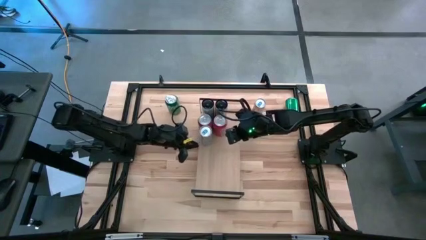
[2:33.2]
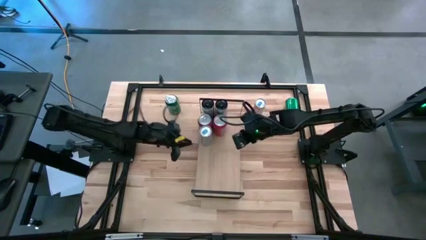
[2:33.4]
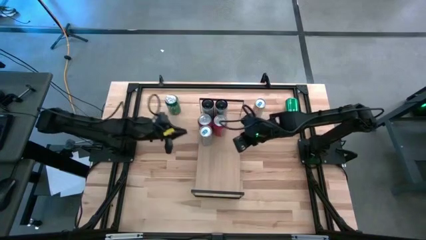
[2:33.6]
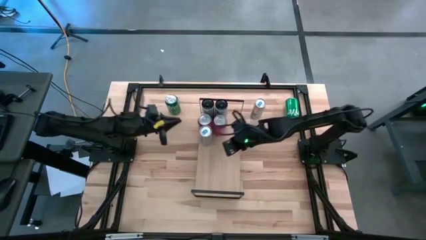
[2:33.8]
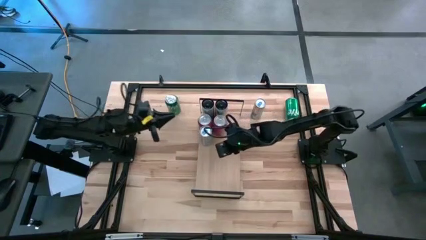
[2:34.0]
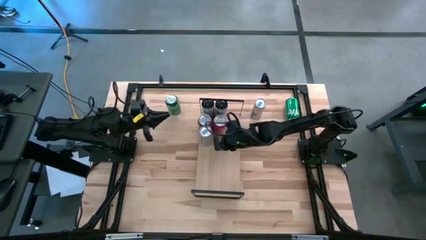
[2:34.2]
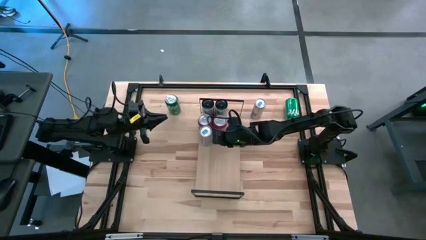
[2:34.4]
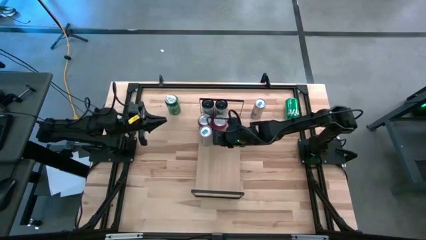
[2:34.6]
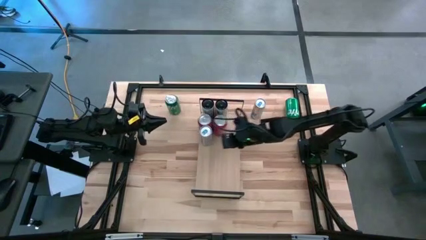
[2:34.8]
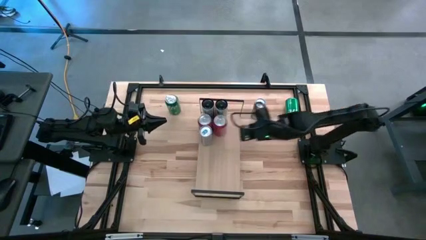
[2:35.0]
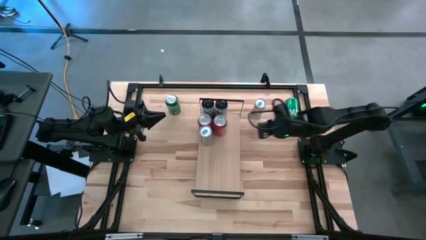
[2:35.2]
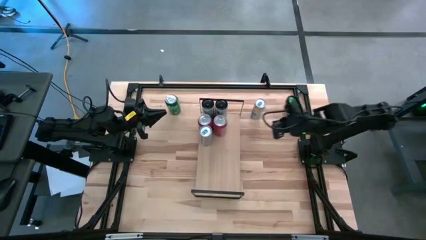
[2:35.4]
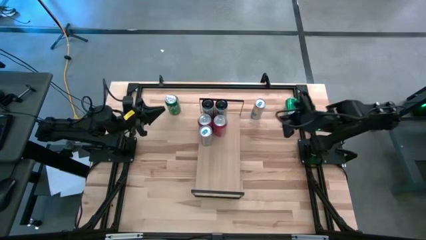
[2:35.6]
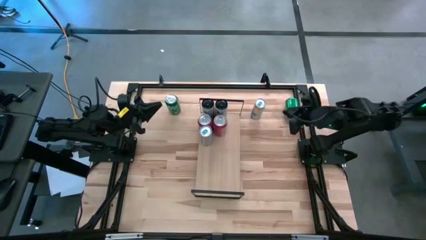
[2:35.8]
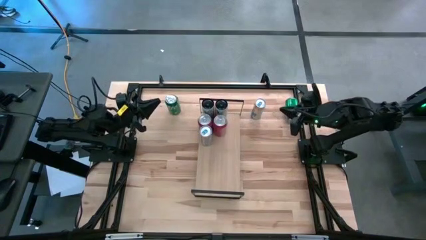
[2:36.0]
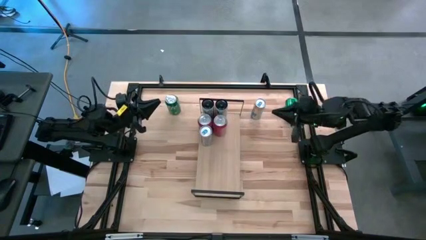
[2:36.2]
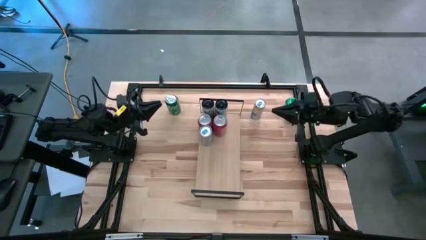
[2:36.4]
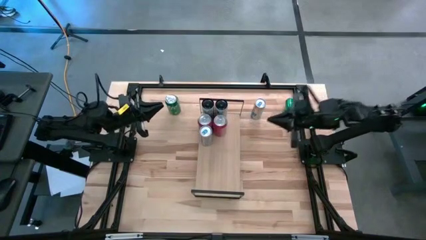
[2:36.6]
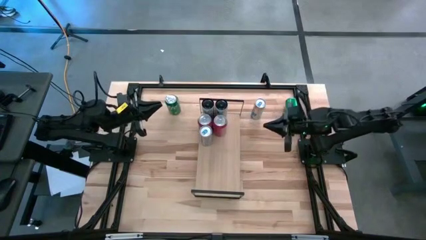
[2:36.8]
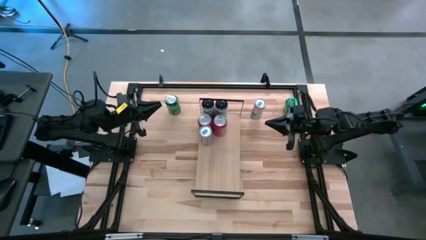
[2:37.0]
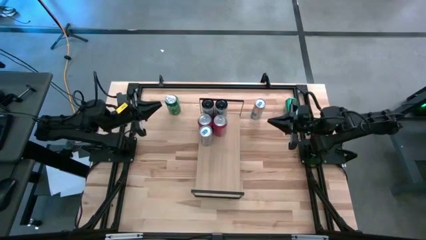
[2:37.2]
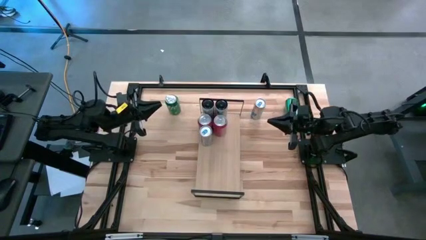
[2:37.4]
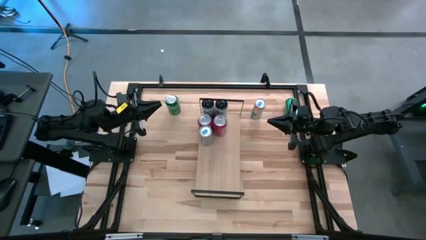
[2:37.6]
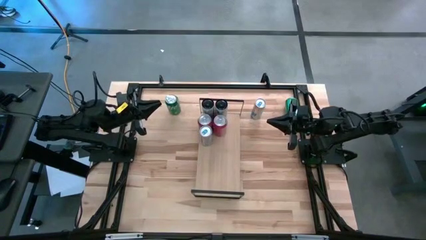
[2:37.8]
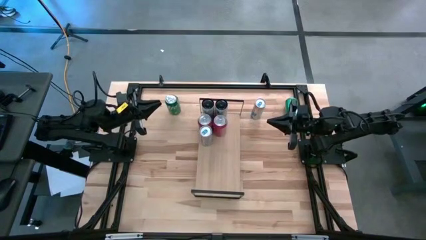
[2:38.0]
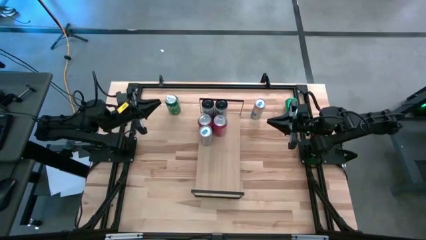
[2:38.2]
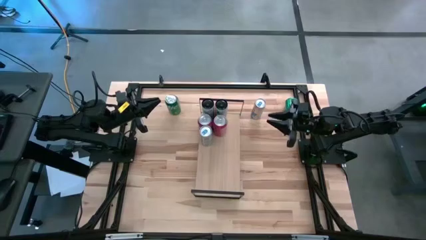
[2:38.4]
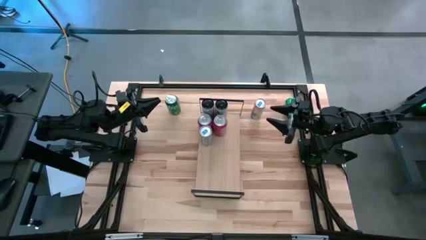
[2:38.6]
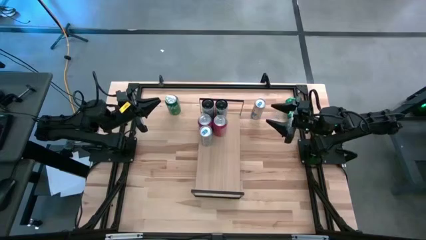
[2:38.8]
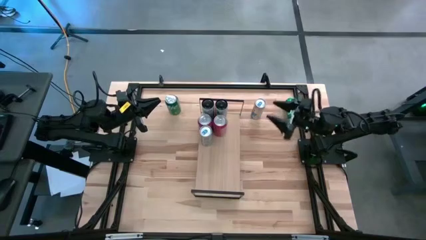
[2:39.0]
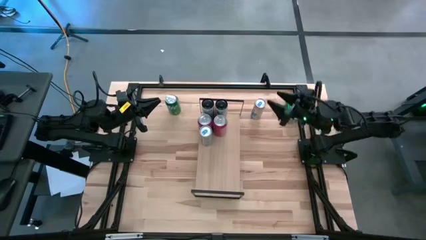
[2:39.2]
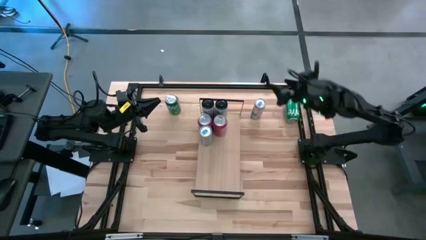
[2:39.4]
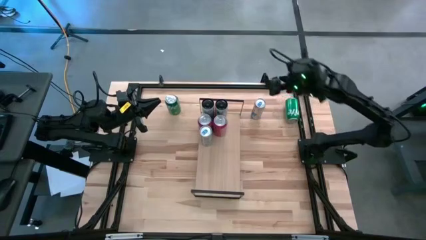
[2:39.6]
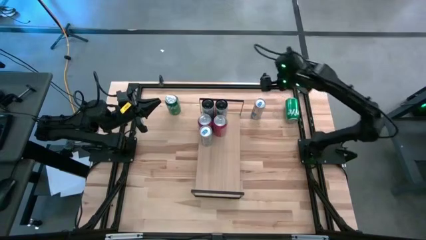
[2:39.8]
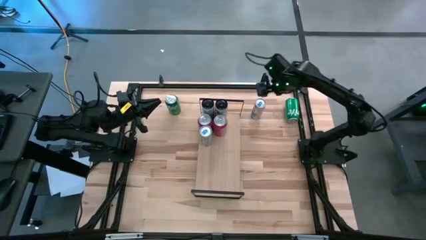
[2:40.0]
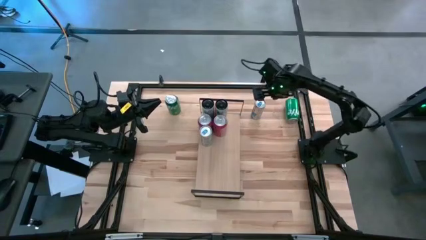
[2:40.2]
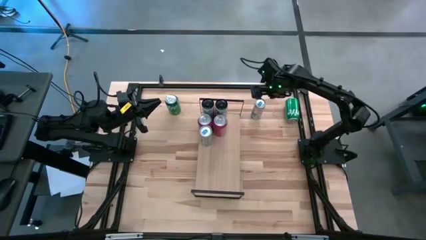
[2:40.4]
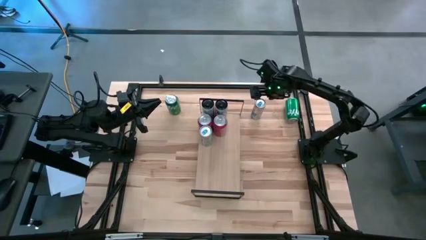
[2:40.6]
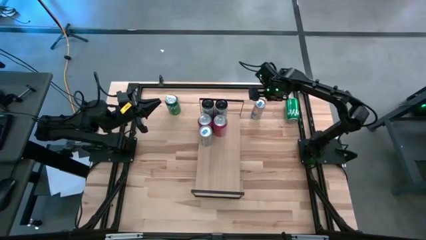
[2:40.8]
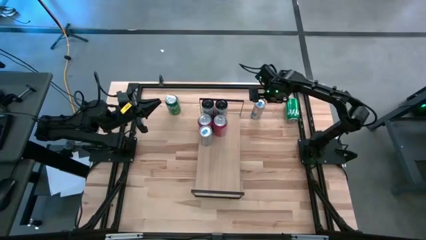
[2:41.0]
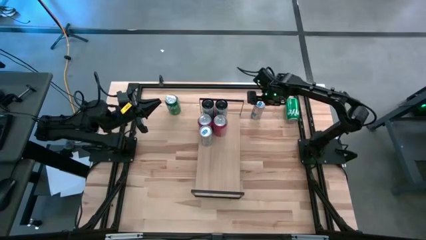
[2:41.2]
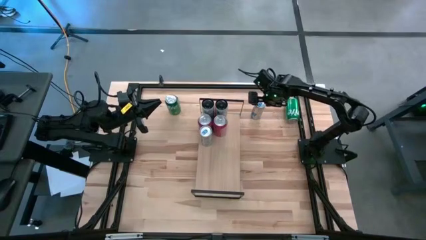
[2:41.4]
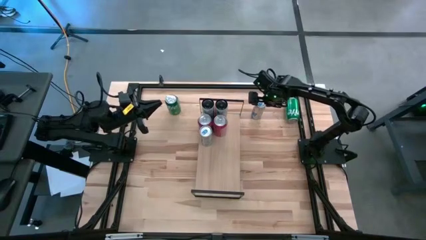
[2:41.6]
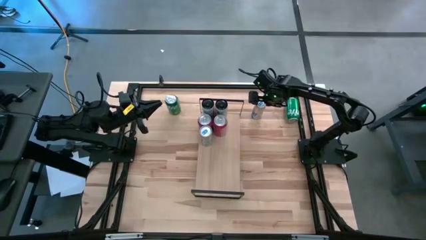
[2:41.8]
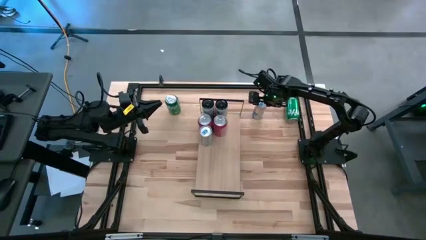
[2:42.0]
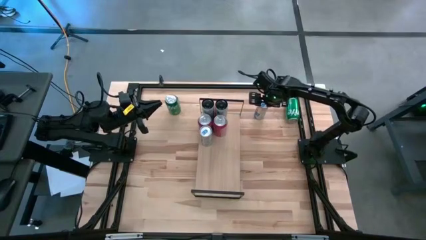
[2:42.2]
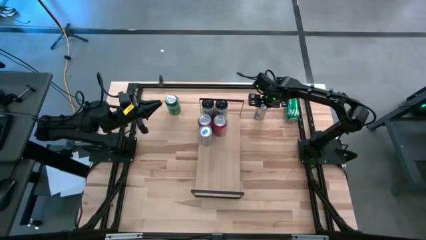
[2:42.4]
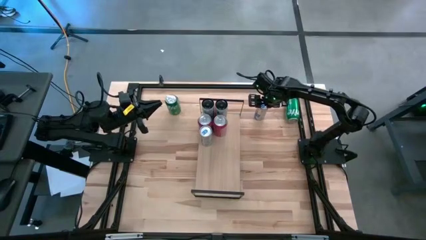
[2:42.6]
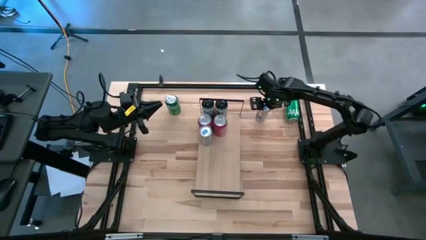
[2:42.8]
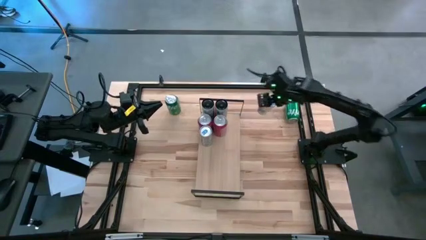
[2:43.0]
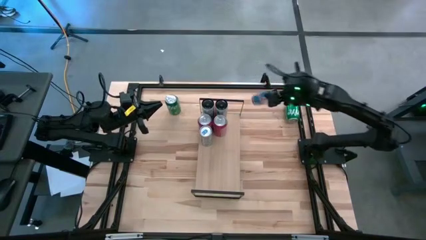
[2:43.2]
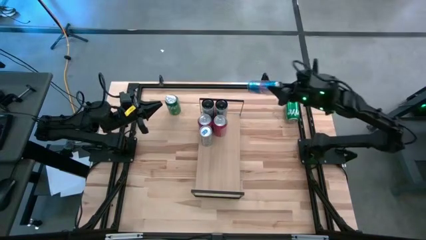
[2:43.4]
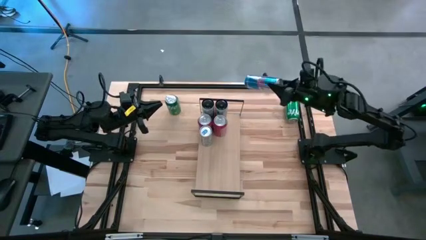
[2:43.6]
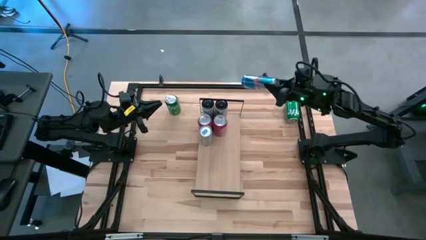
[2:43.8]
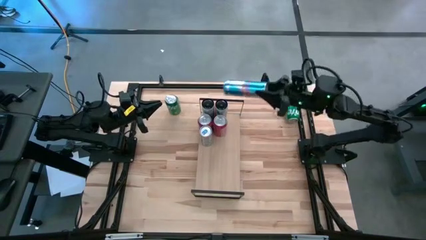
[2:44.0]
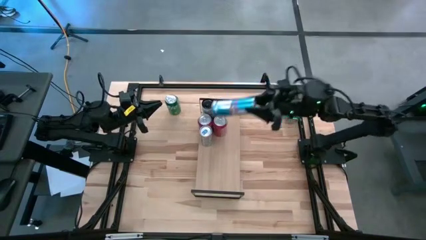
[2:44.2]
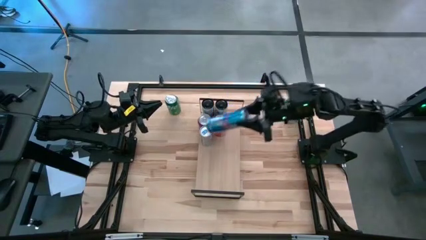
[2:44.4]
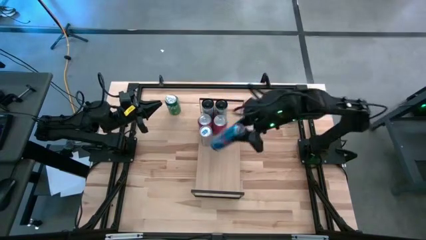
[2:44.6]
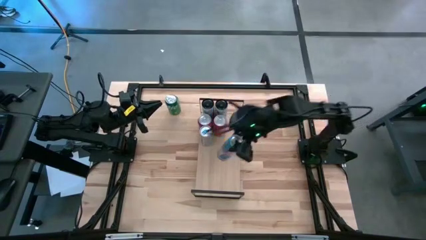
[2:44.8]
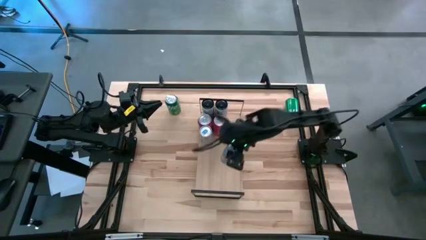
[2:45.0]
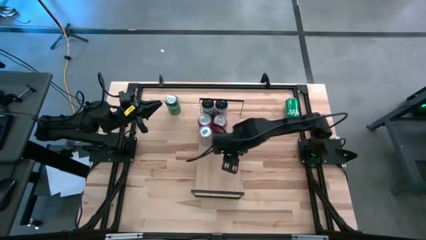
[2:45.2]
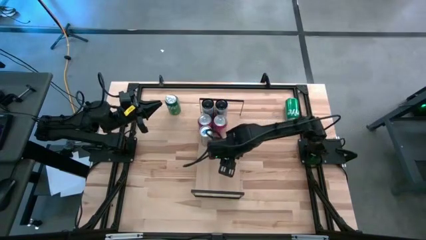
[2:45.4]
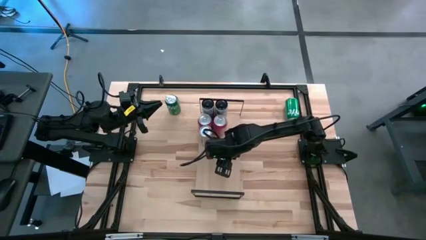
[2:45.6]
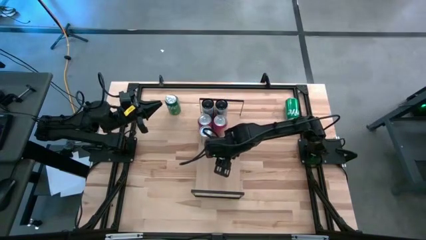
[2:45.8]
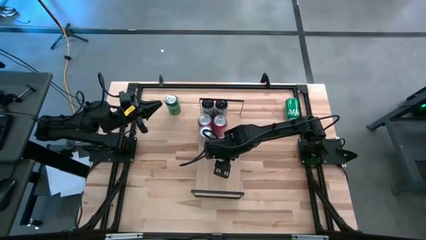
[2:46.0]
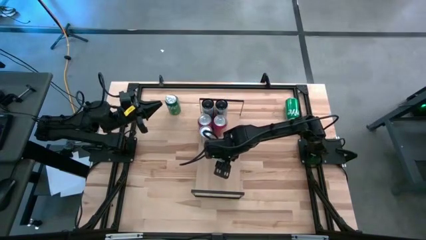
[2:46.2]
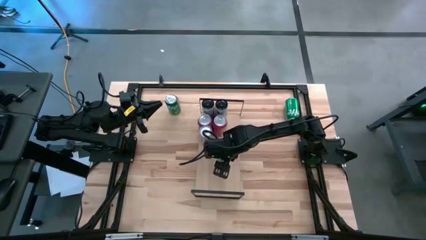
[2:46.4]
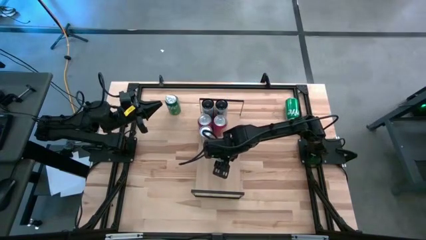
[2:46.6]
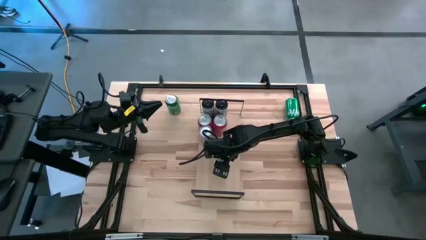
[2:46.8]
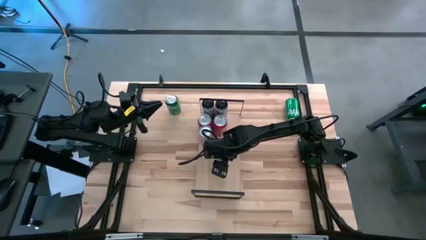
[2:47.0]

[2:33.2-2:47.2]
Task: Place canned beverage on shelf
Put the blue soda can, aligned with the other blue soda can on the shelf
